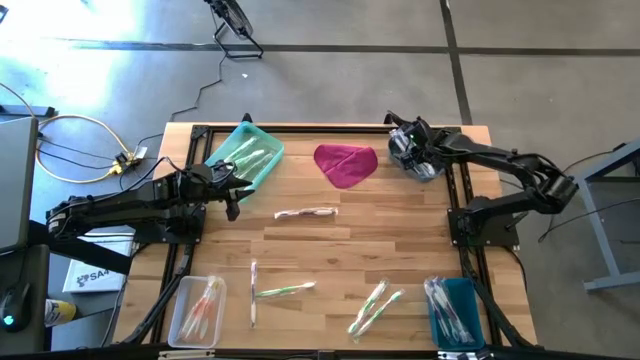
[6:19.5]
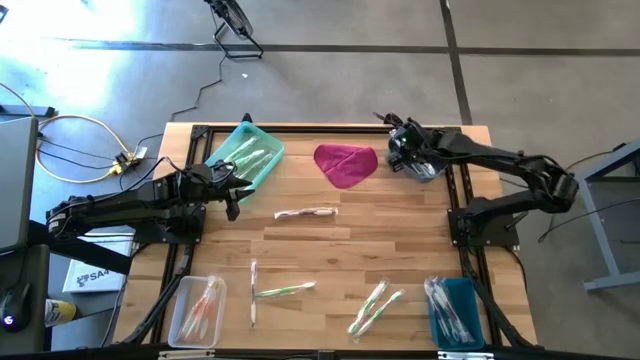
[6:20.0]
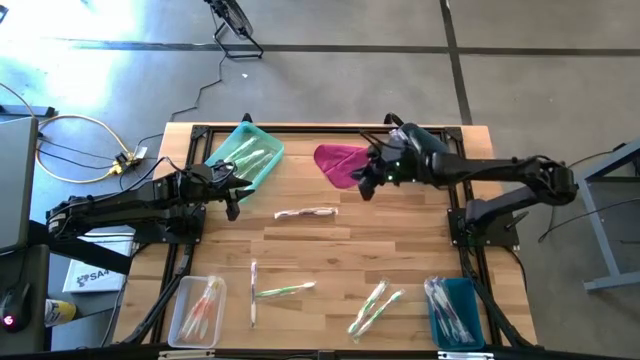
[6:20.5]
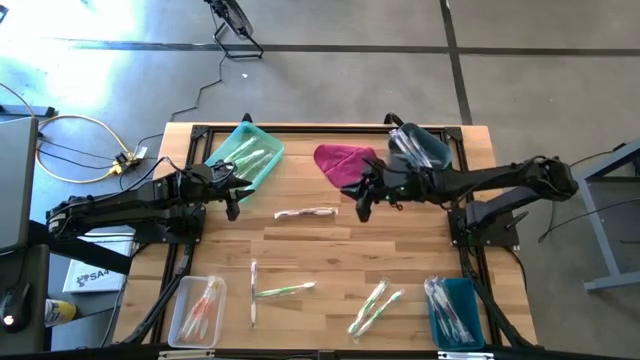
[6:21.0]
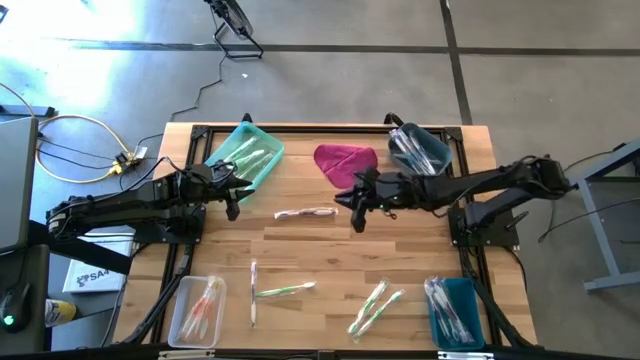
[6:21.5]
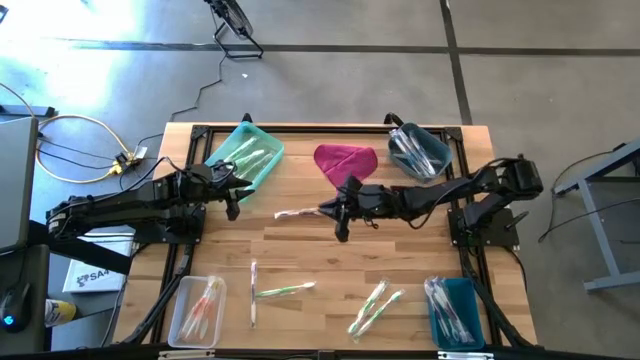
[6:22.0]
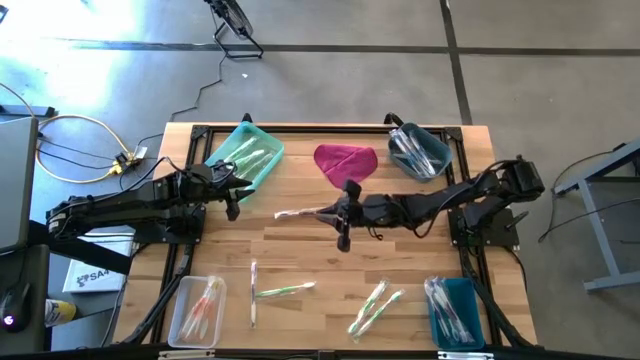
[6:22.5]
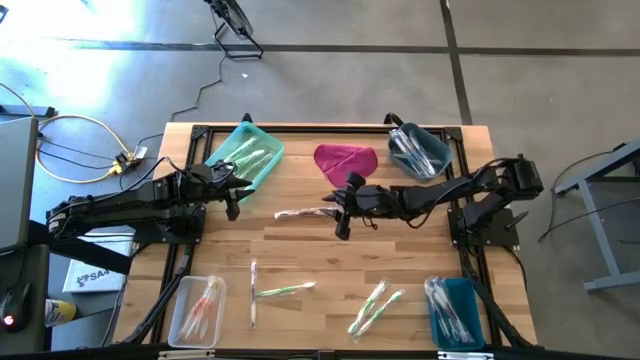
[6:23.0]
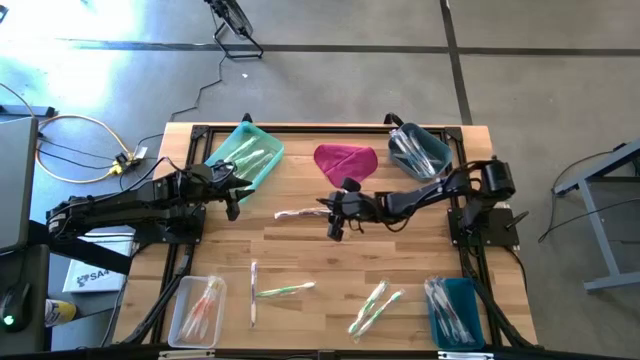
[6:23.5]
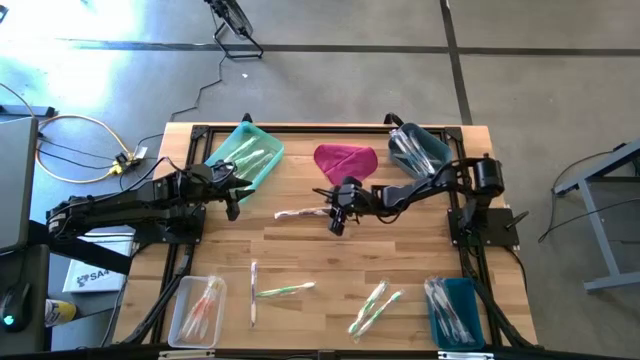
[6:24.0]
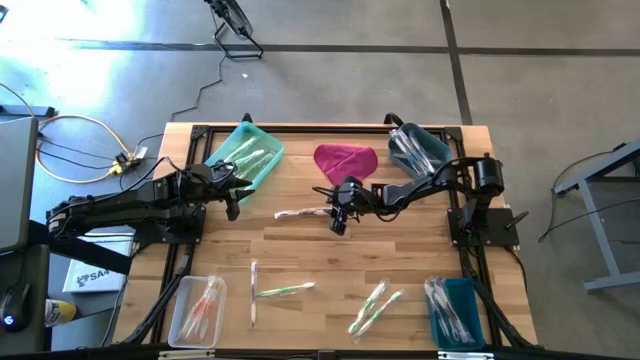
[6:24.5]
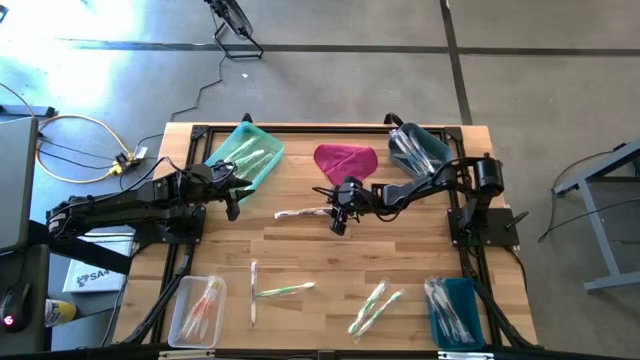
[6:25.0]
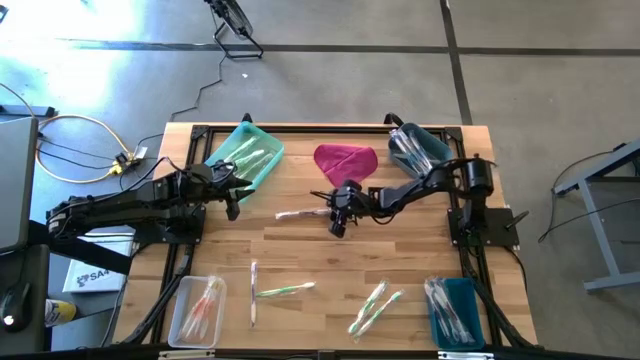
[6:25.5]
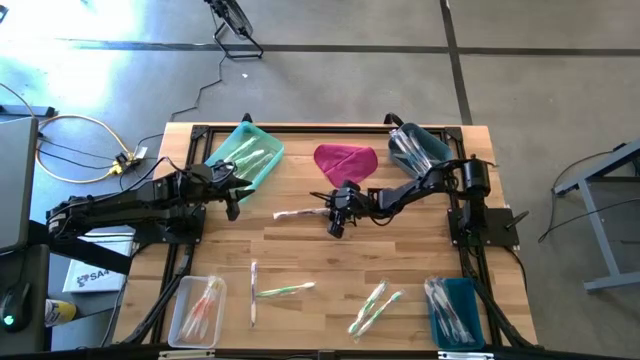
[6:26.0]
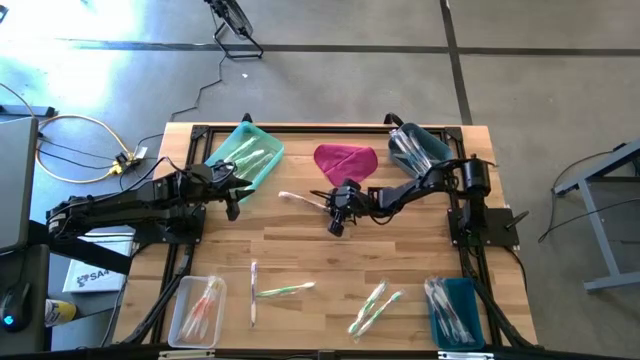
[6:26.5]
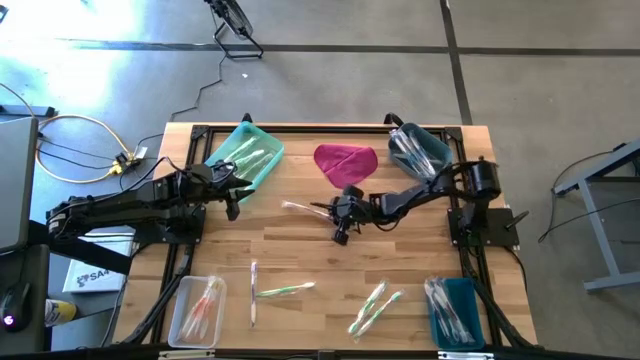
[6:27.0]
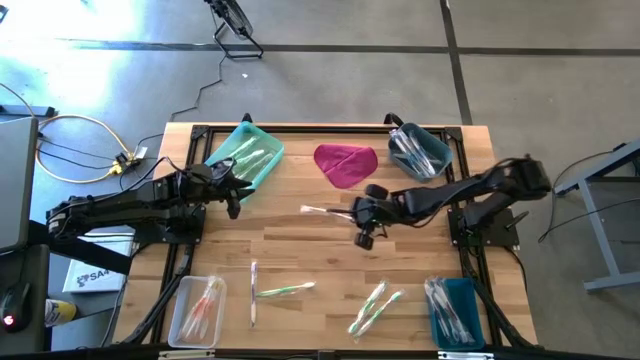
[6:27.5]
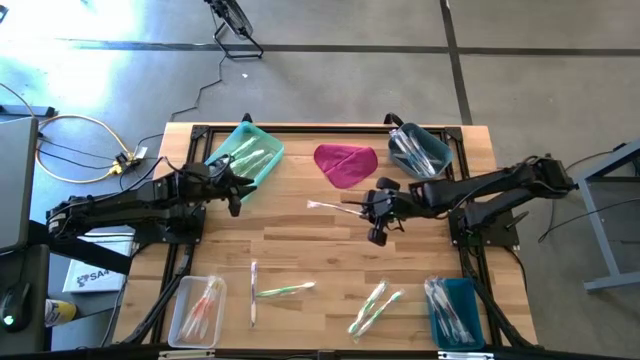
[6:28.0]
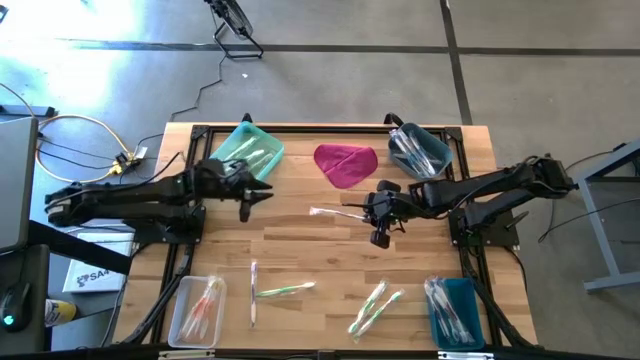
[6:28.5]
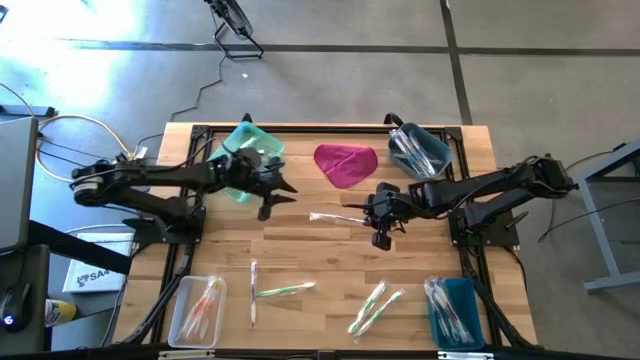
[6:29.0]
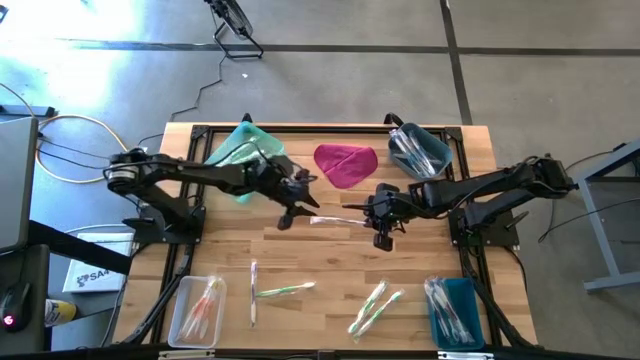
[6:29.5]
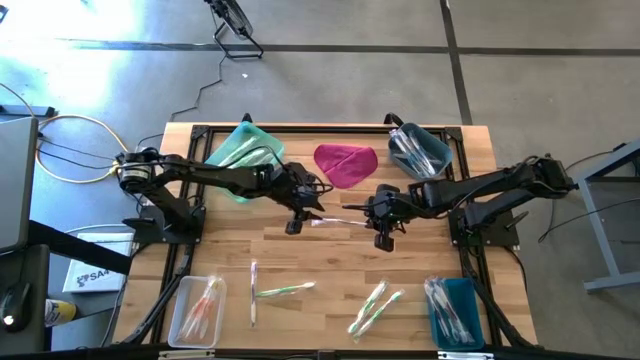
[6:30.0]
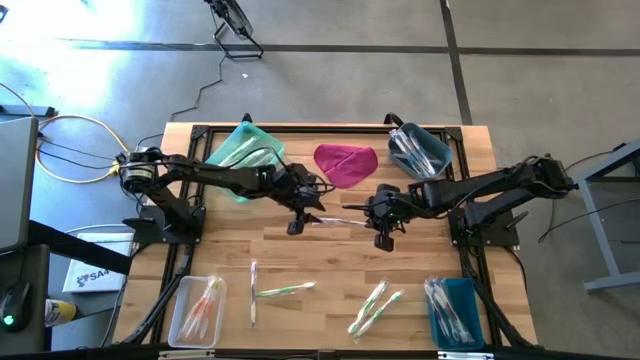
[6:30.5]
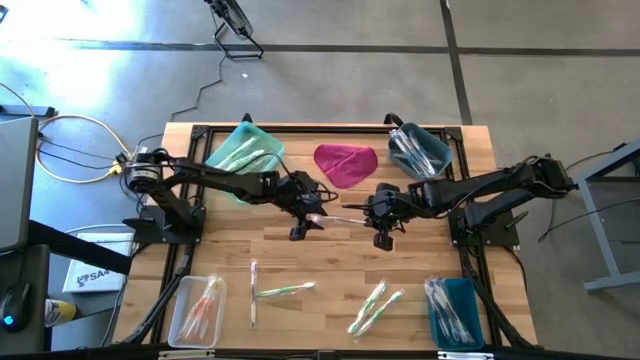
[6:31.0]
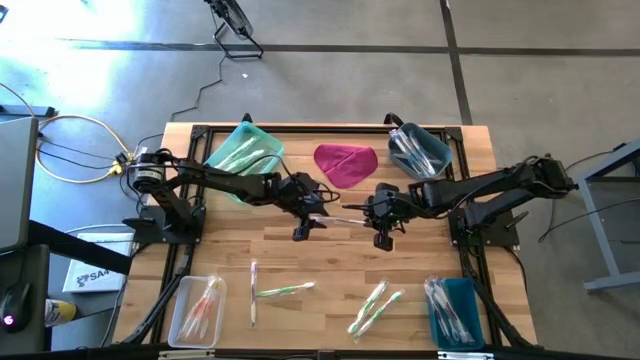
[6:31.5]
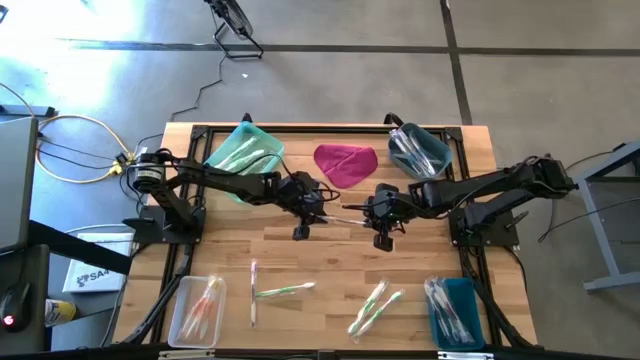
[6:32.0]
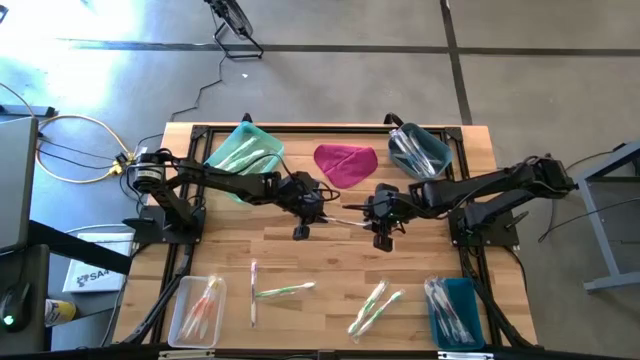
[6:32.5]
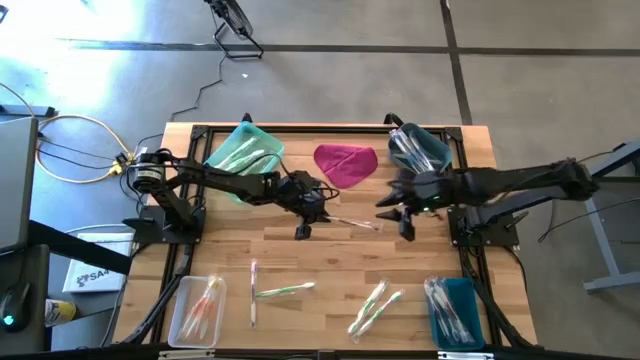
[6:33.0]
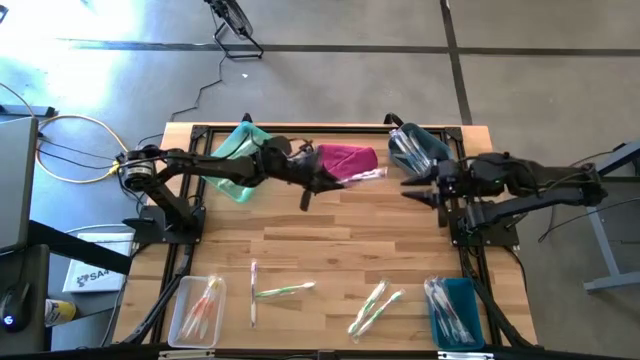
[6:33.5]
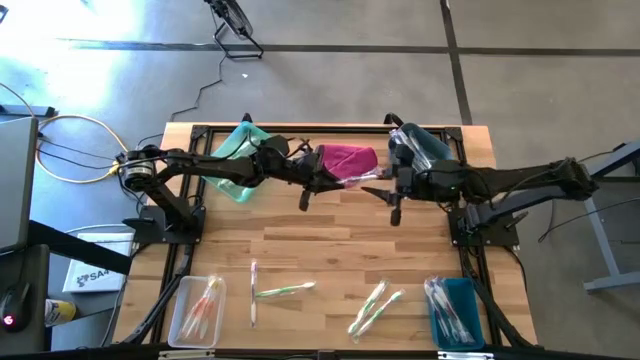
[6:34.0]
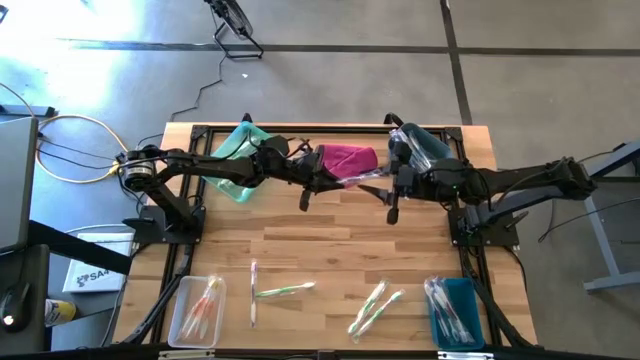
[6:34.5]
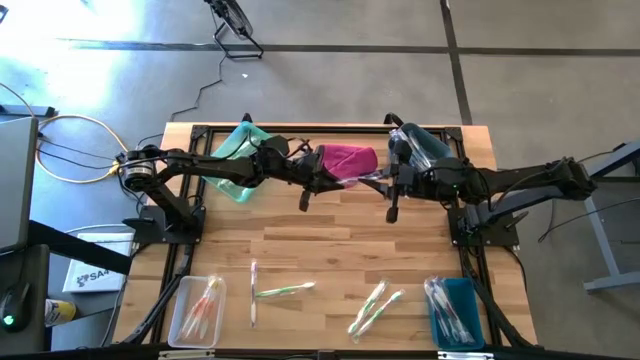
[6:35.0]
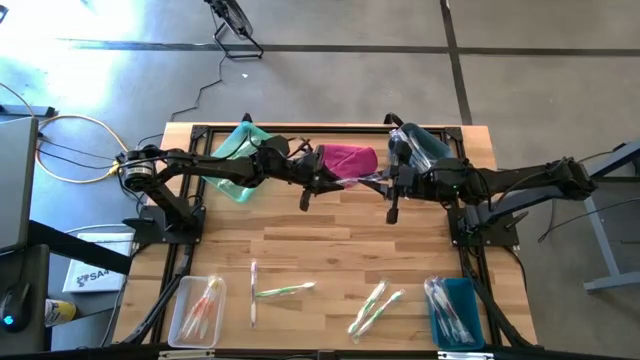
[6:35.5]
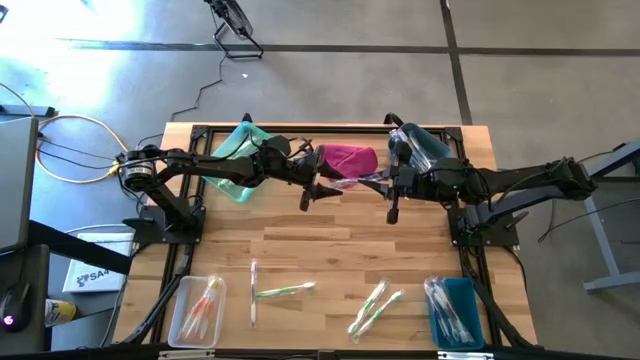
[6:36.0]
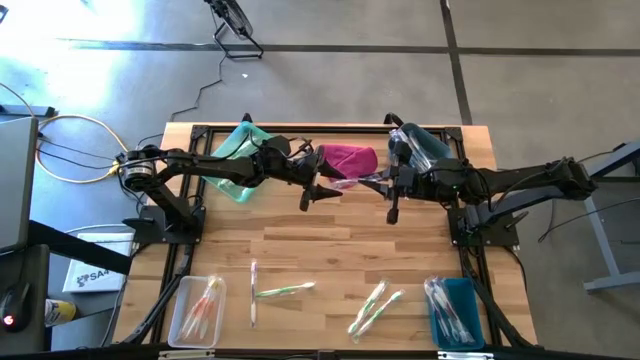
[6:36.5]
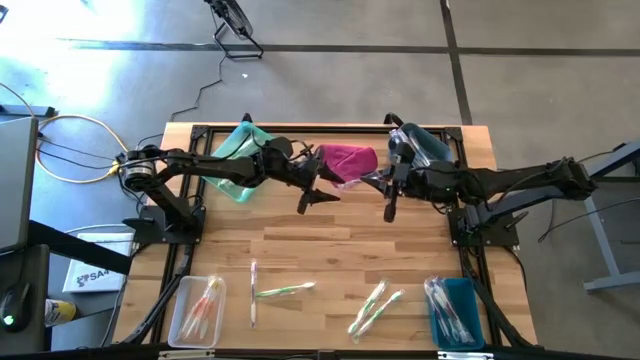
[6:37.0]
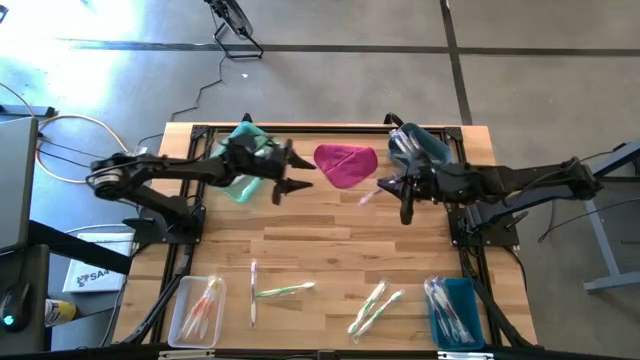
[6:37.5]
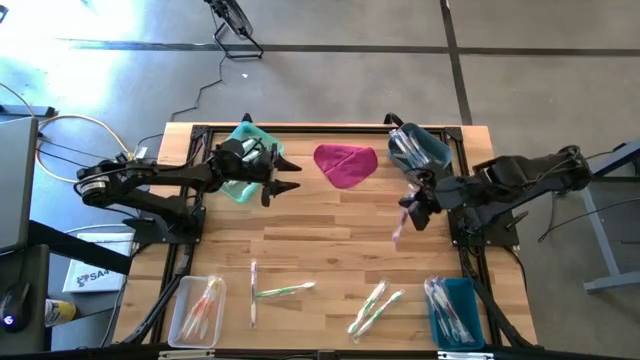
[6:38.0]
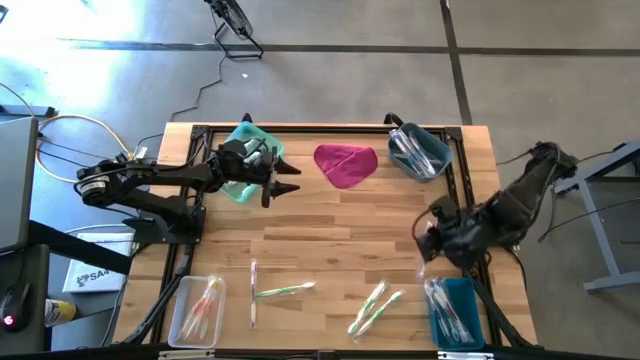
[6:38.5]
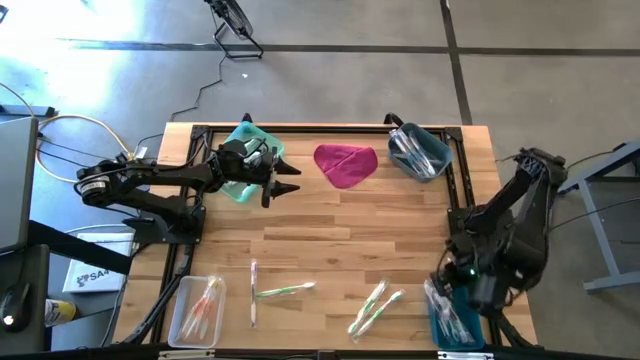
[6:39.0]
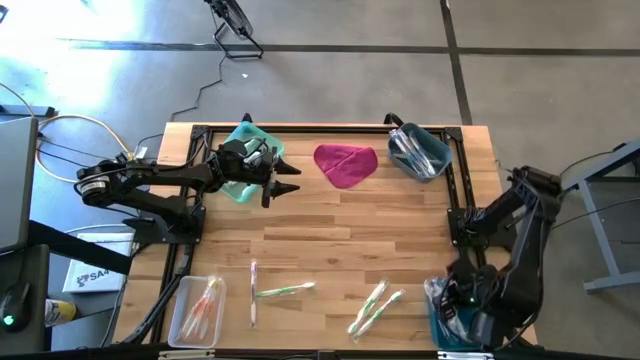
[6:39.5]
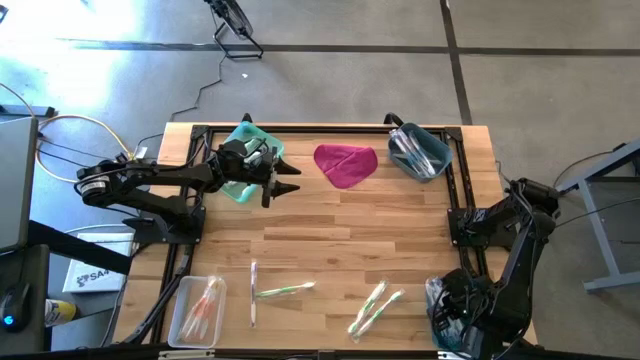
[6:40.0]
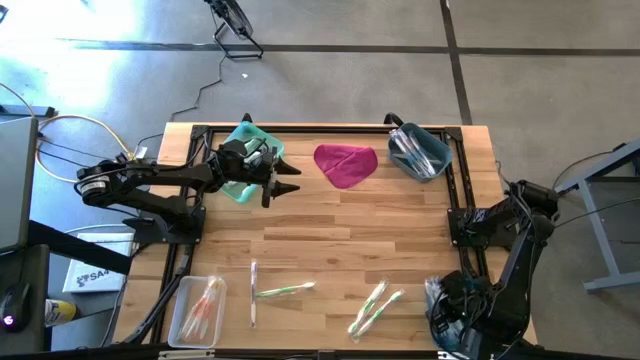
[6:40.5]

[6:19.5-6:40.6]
Task: Pick & Place Toothbrushes
Put the purple toothbrush to the dark blue bin bin
